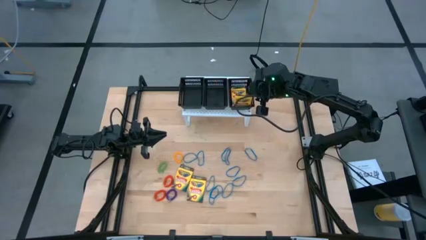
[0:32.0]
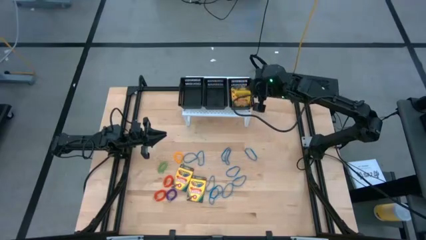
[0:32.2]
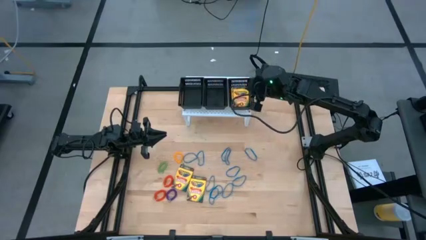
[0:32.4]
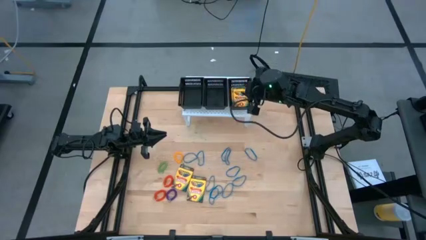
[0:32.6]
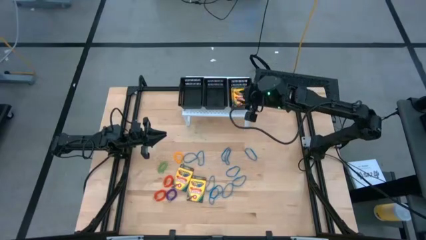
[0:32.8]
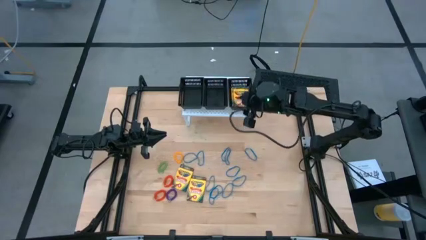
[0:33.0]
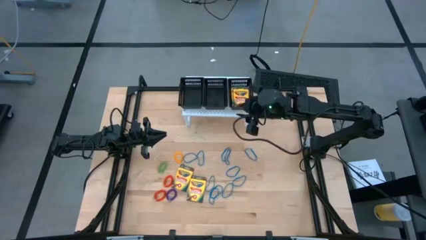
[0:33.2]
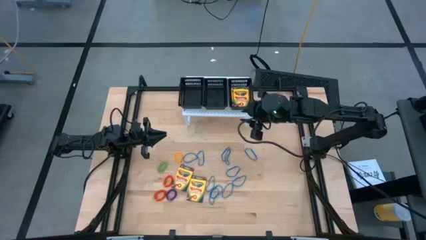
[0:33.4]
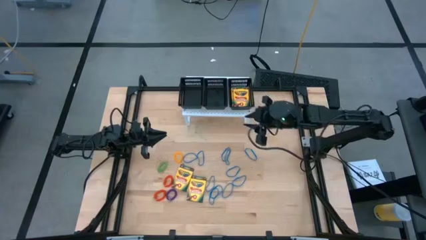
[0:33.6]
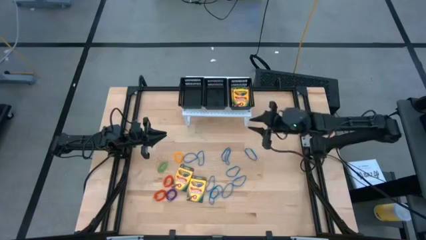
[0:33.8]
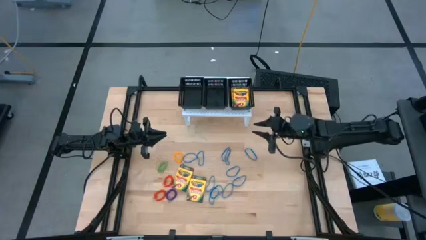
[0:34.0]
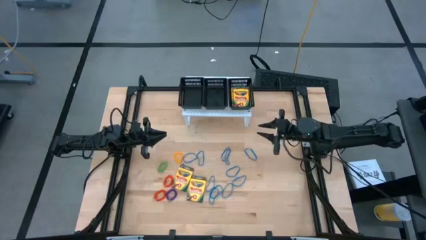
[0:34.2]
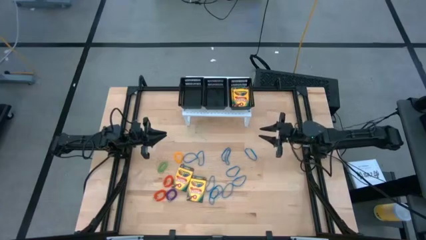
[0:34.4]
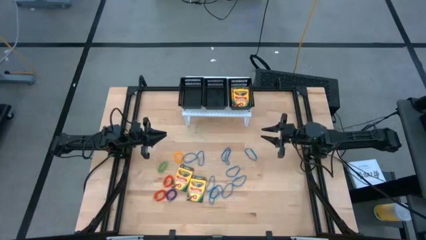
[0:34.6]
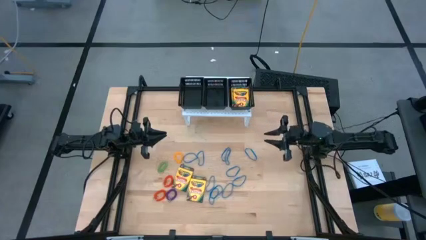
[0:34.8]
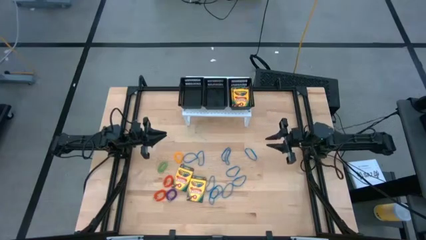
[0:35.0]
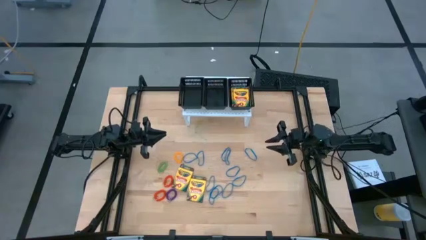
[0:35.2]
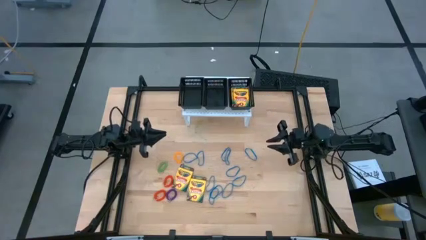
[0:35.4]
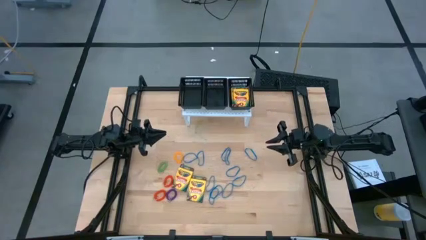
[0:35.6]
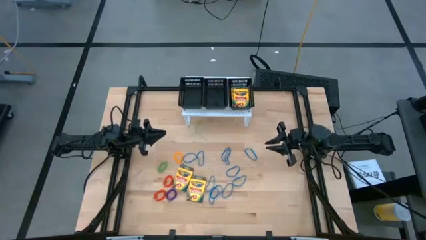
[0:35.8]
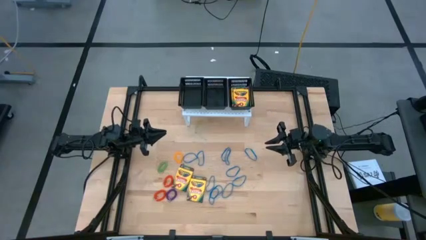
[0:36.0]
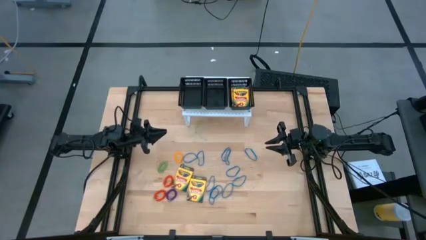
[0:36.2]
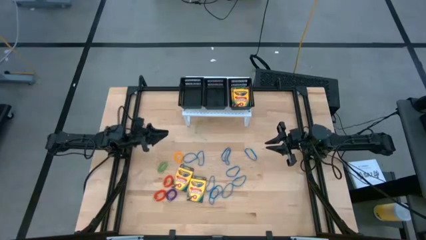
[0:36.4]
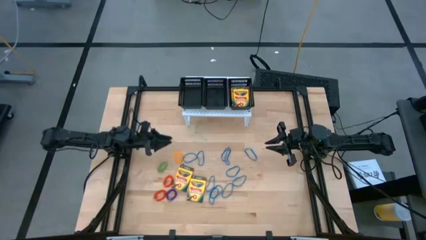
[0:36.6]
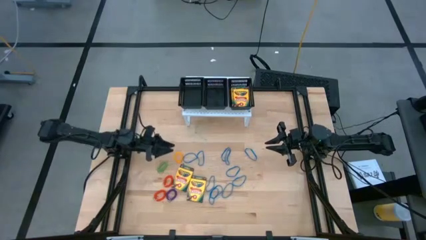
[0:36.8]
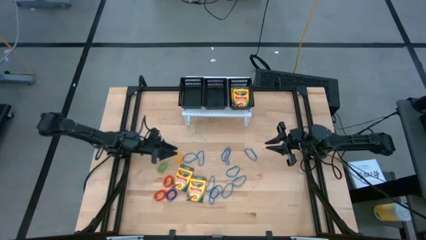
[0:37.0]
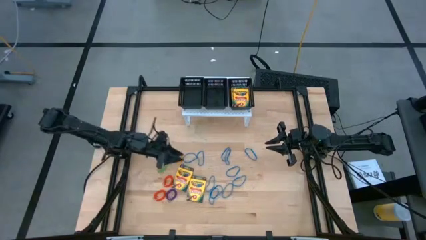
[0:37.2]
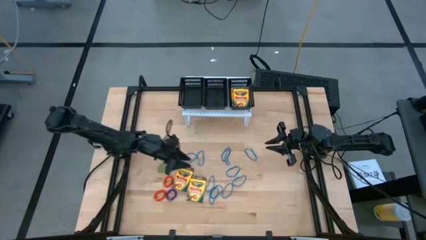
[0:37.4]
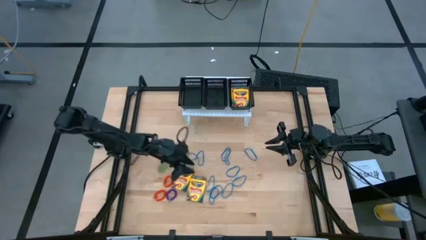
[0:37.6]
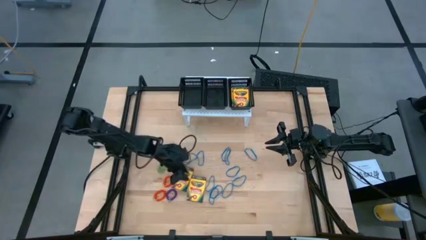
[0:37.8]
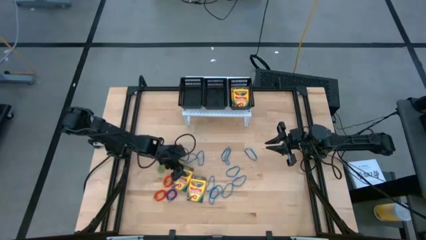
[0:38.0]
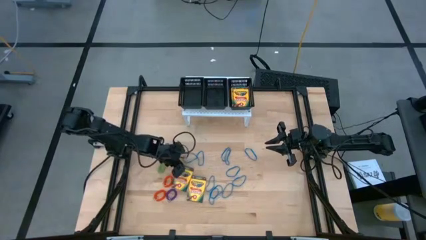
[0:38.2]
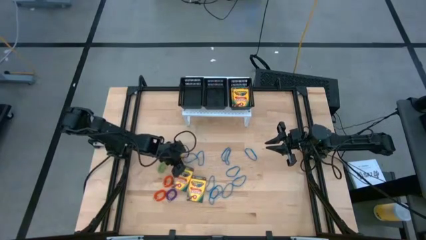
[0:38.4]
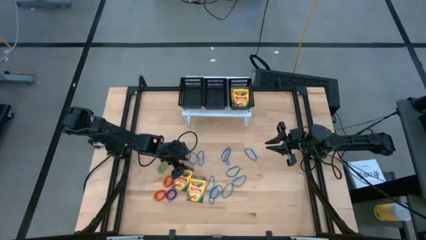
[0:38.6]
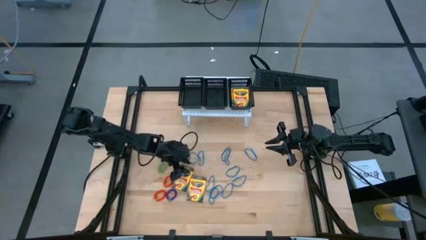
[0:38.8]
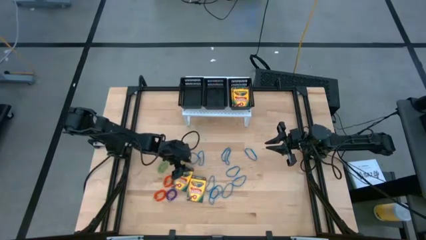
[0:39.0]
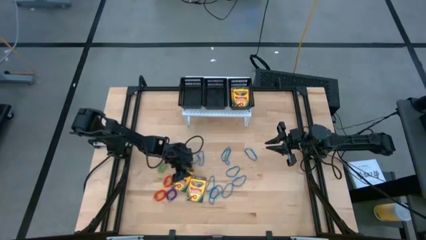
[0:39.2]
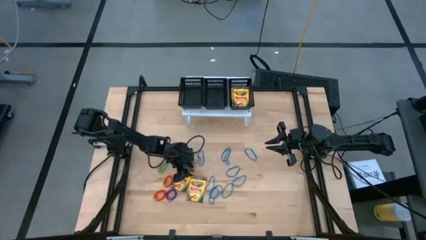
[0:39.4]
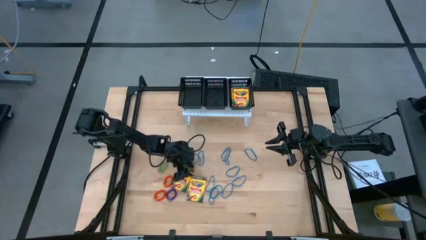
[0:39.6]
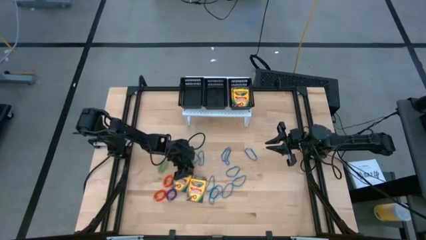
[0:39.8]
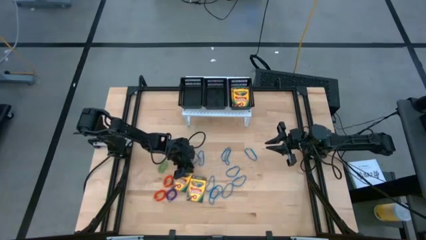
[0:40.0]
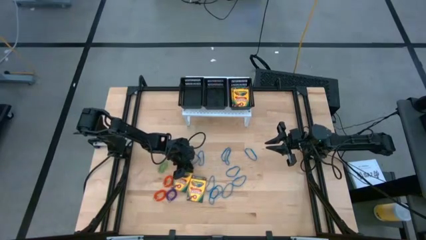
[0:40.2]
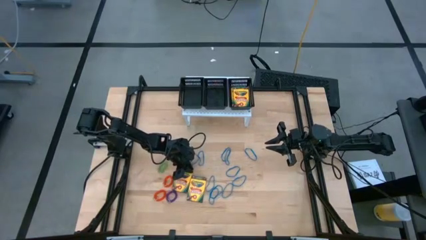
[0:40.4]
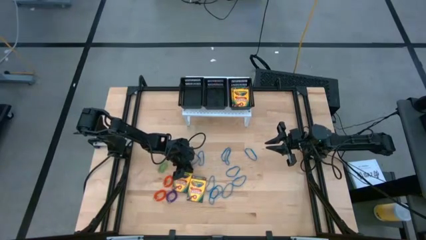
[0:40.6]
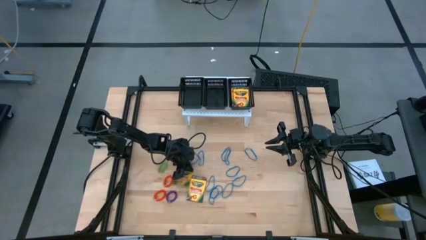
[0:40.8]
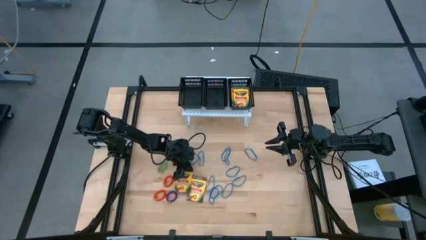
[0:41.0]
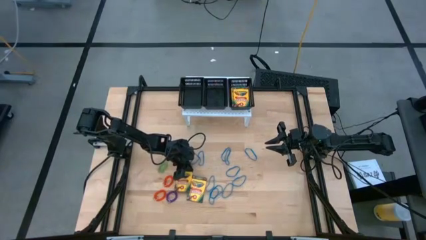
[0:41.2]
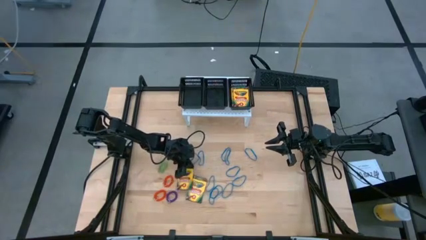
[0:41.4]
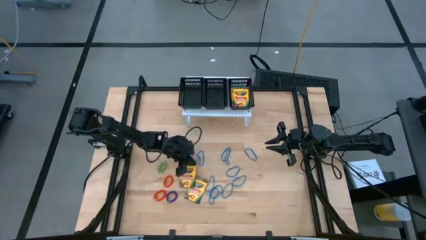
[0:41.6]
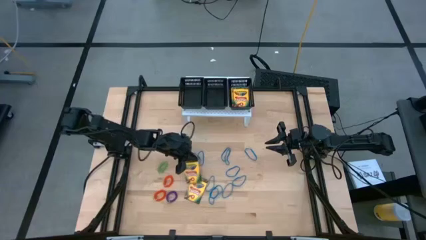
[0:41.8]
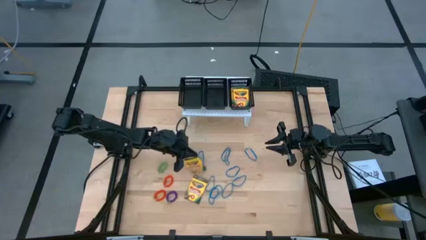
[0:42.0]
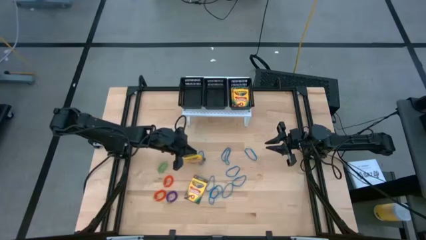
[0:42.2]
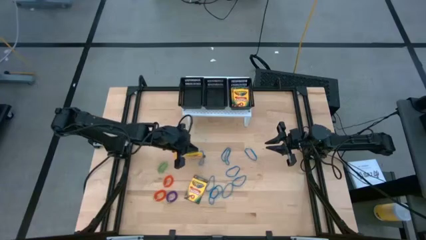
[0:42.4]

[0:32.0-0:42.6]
Task: Pick & Place Office Desk Supplies
Put the crayon box into the right black bin
